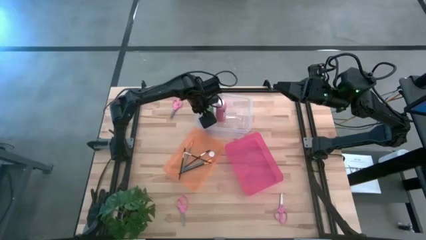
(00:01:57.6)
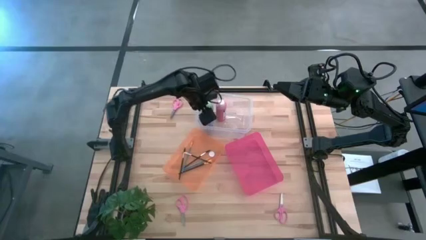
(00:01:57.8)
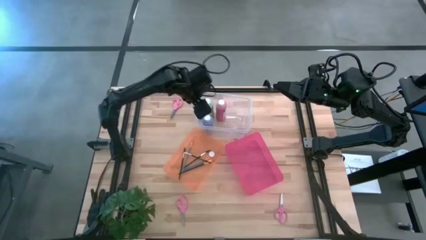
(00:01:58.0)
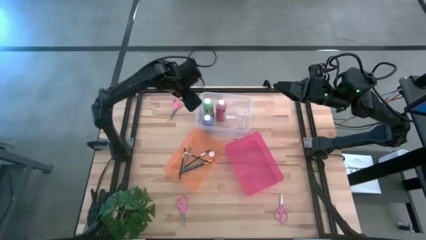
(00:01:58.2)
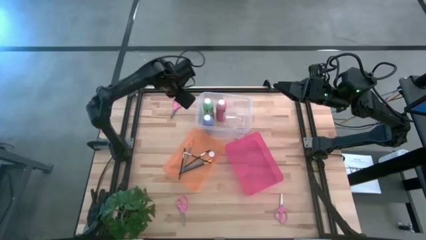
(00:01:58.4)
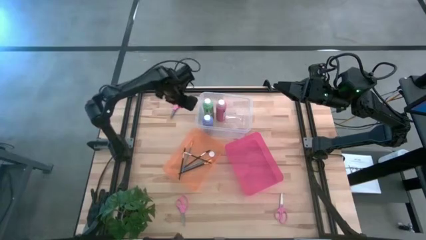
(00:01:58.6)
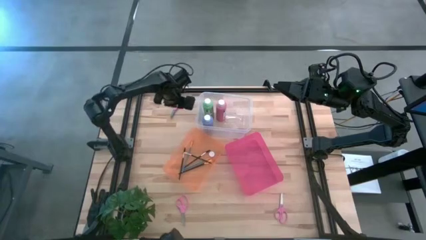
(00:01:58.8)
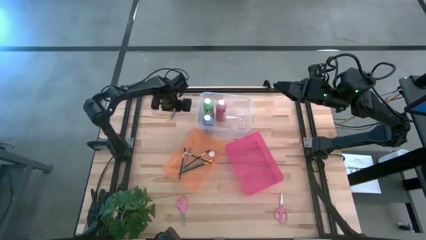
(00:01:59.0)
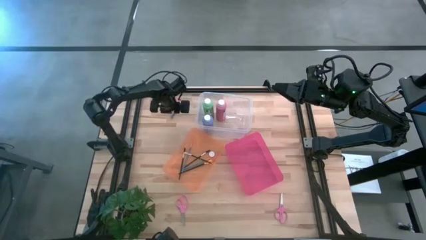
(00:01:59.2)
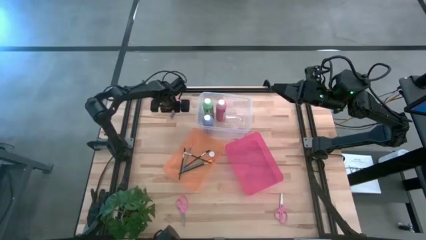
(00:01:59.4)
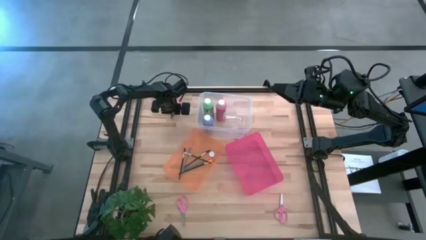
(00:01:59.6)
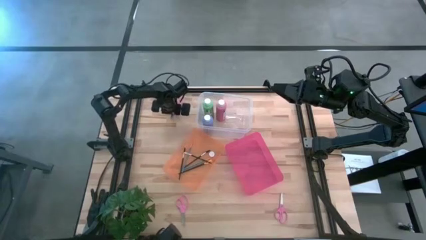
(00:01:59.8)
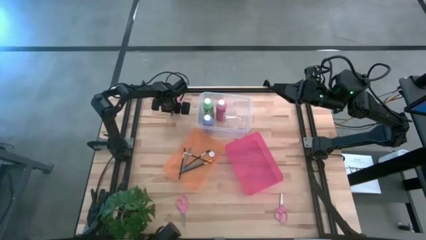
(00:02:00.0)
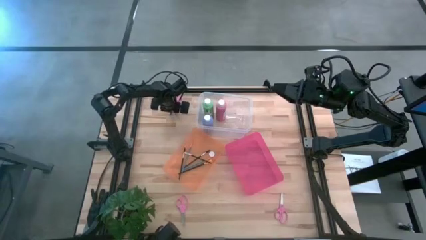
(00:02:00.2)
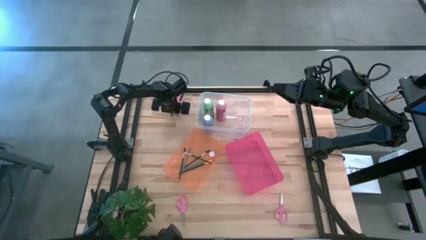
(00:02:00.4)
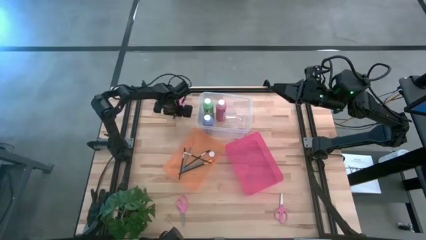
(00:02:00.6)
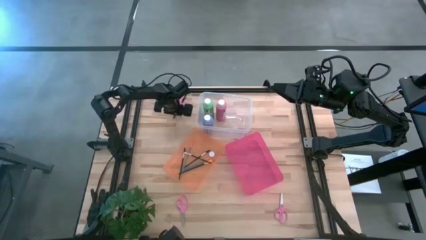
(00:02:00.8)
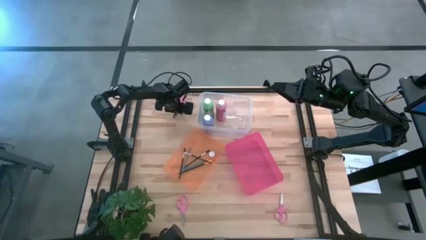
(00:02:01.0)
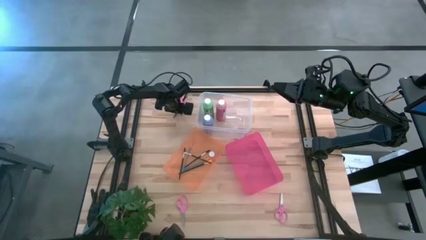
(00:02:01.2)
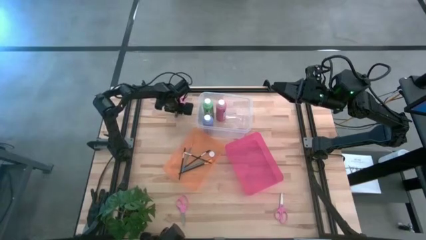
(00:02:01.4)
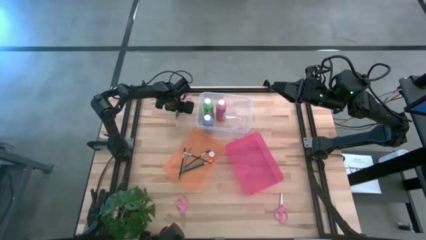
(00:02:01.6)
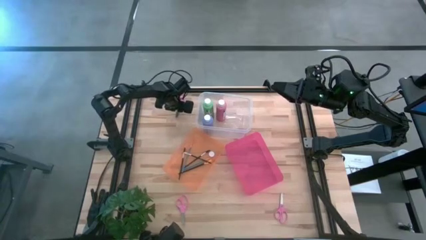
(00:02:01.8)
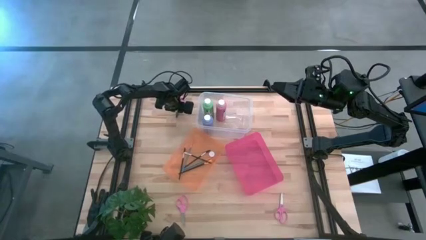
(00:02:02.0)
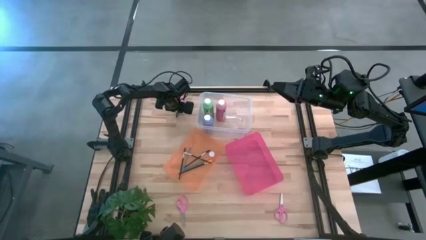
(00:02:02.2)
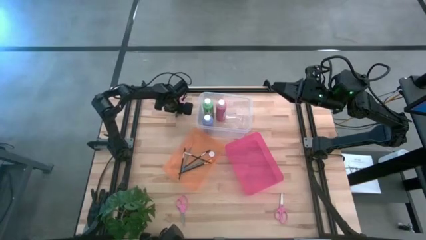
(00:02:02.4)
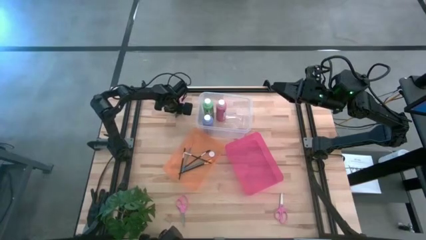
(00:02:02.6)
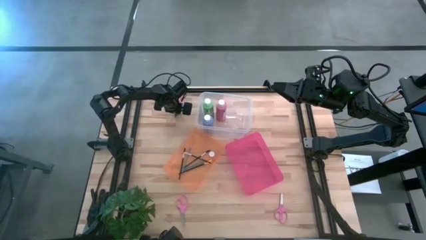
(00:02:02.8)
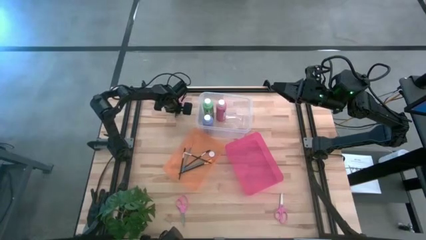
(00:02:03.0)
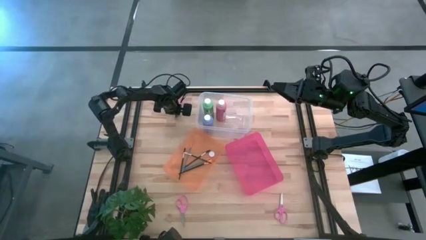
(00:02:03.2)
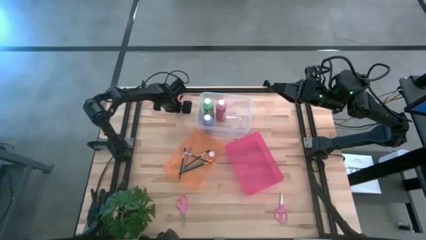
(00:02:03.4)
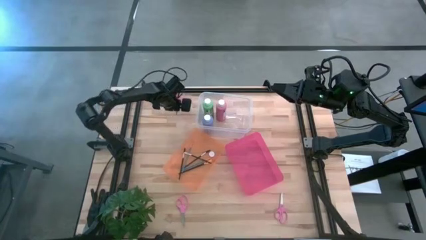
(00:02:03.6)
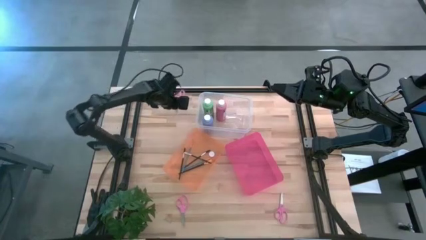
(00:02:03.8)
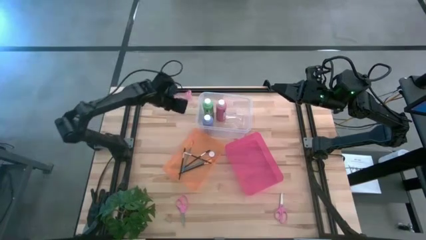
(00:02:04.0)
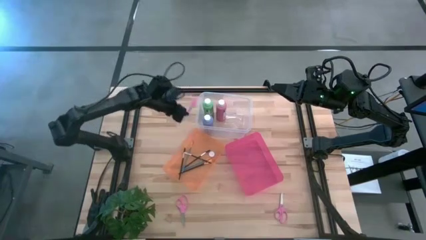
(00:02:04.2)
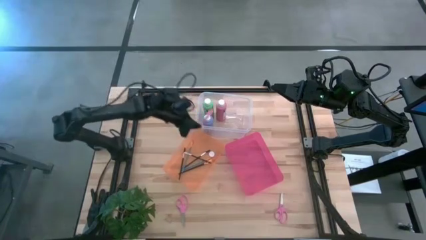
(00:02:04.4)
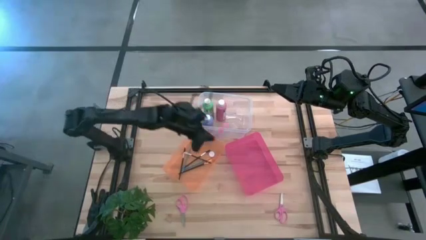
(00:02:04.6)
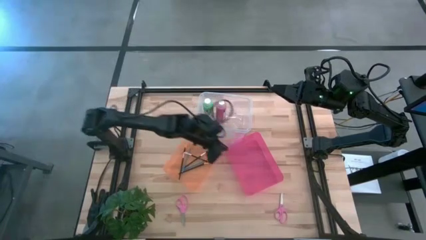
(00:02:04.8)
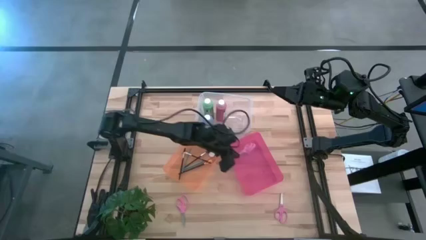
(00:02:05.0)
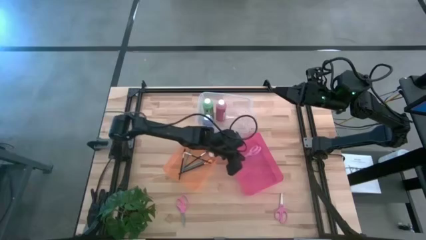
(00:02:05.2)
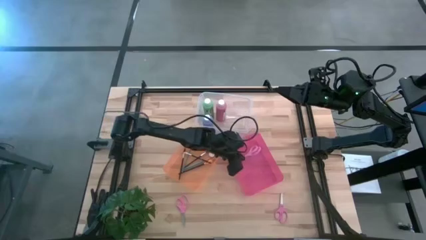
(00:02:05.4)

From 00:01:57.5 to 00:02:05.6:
Task: Pick & Place Paint Supplies
Put the top left pink scissors into the pink bin

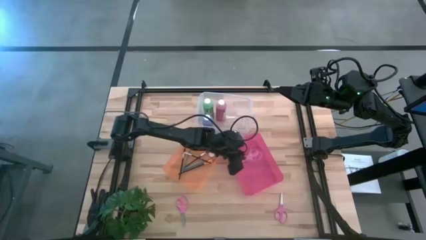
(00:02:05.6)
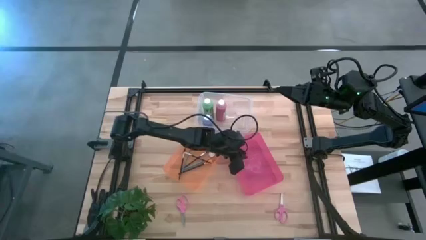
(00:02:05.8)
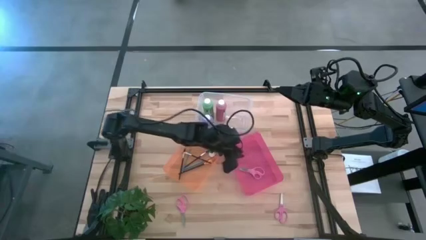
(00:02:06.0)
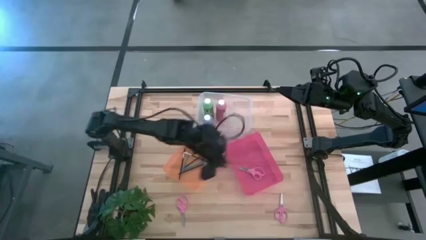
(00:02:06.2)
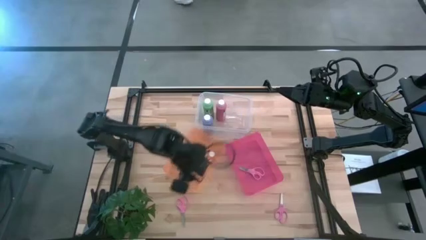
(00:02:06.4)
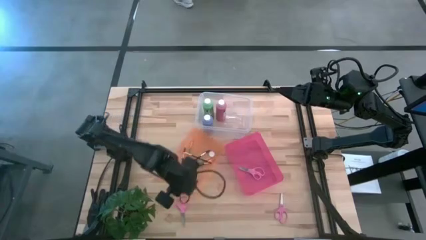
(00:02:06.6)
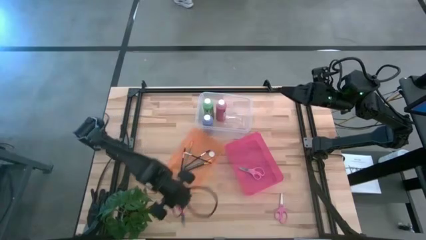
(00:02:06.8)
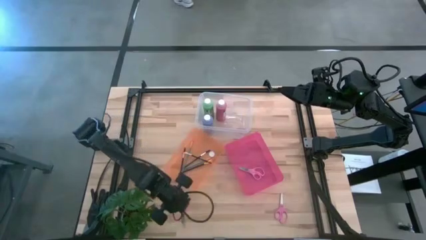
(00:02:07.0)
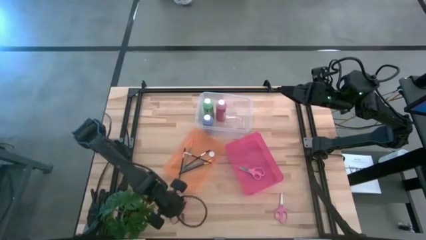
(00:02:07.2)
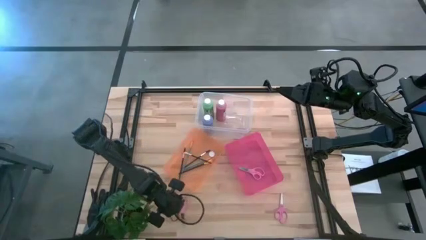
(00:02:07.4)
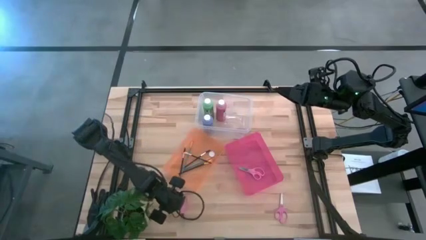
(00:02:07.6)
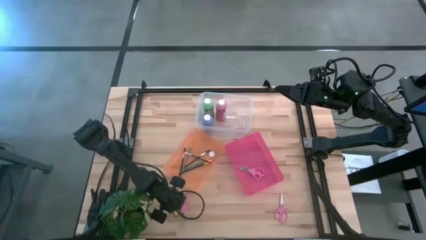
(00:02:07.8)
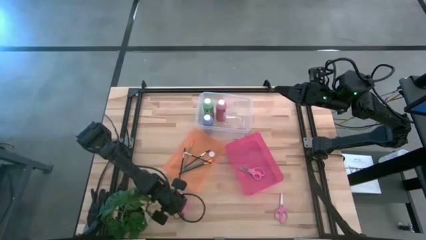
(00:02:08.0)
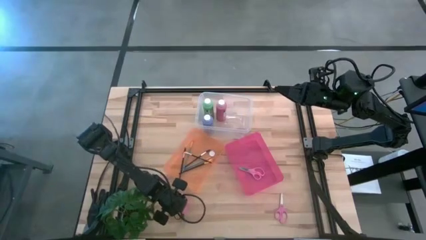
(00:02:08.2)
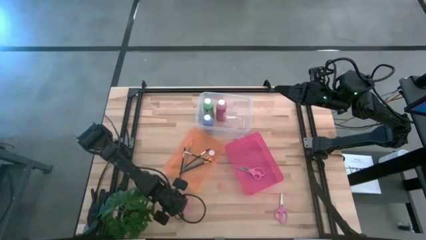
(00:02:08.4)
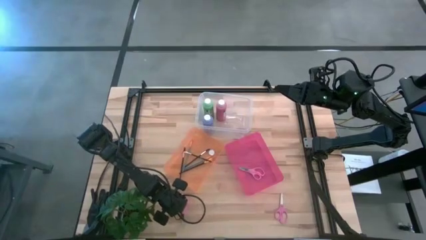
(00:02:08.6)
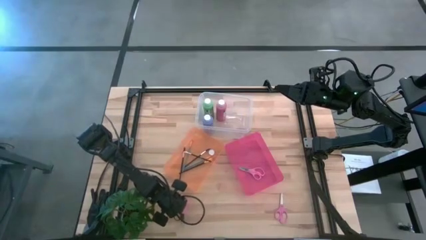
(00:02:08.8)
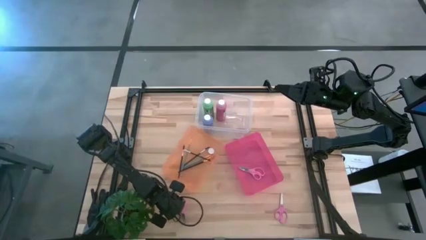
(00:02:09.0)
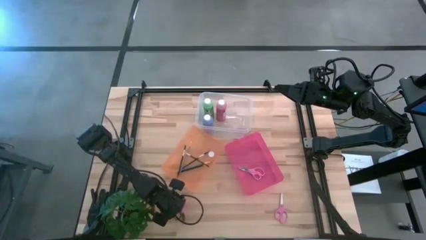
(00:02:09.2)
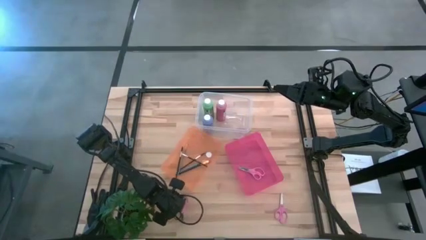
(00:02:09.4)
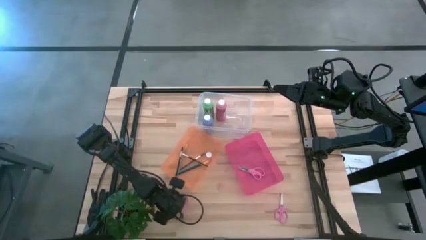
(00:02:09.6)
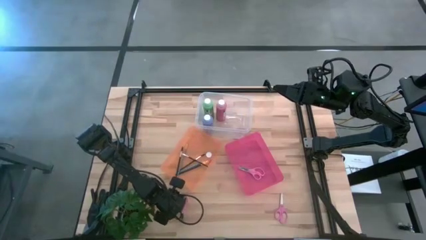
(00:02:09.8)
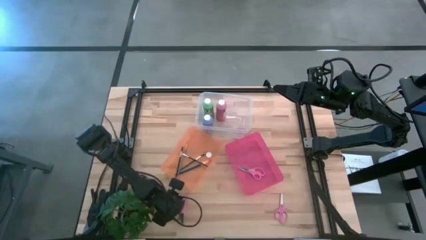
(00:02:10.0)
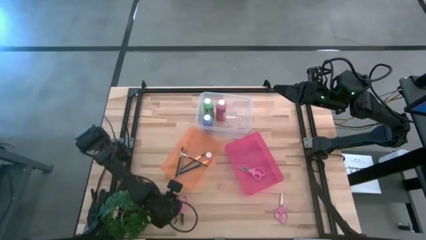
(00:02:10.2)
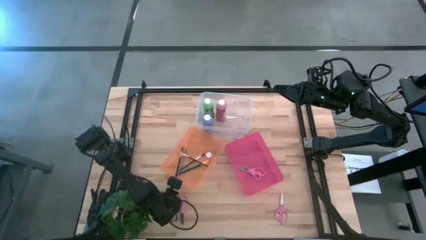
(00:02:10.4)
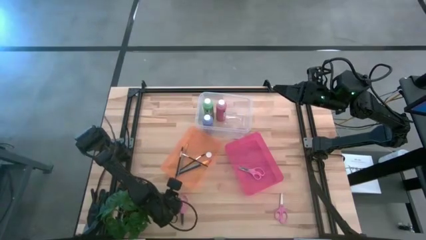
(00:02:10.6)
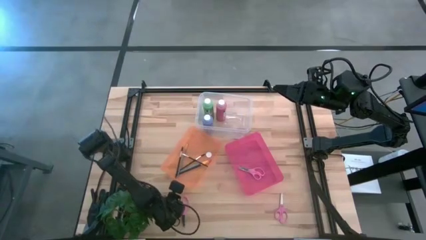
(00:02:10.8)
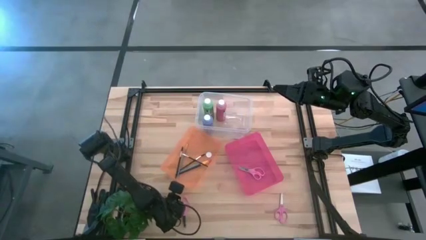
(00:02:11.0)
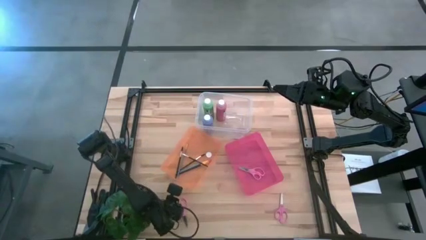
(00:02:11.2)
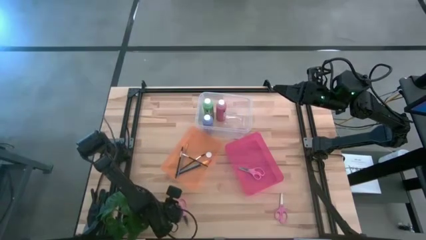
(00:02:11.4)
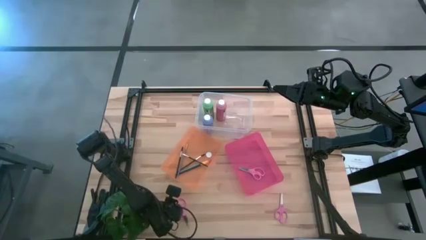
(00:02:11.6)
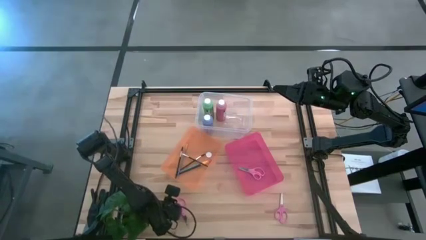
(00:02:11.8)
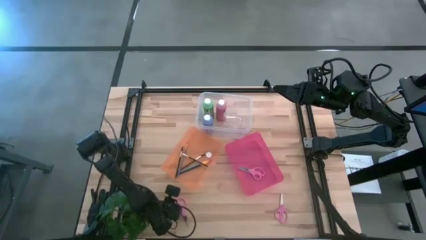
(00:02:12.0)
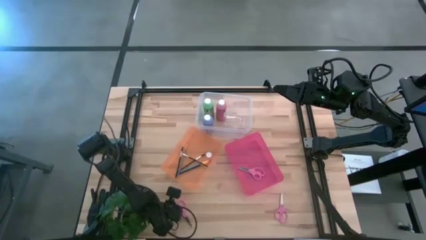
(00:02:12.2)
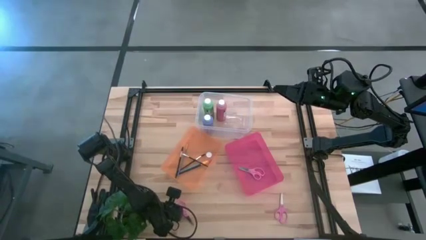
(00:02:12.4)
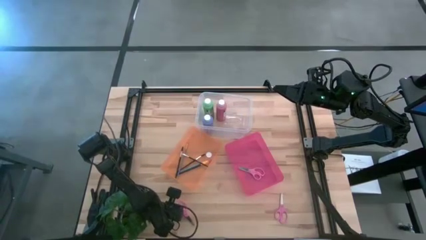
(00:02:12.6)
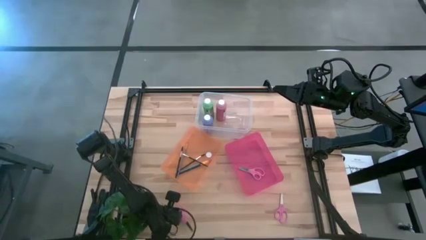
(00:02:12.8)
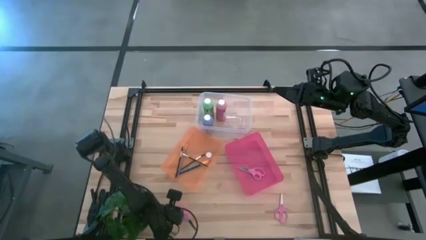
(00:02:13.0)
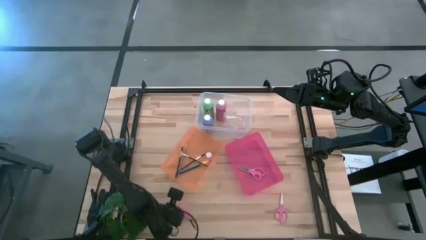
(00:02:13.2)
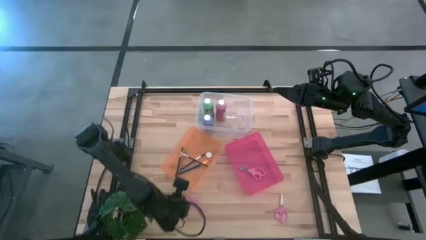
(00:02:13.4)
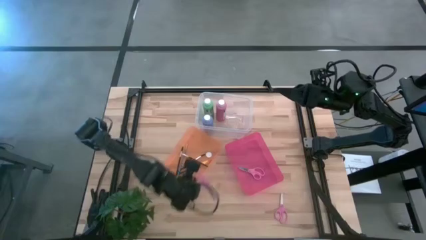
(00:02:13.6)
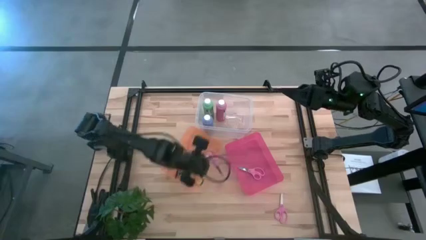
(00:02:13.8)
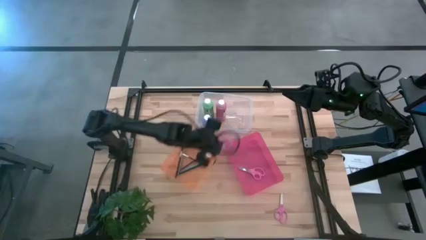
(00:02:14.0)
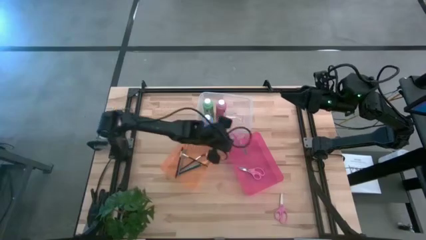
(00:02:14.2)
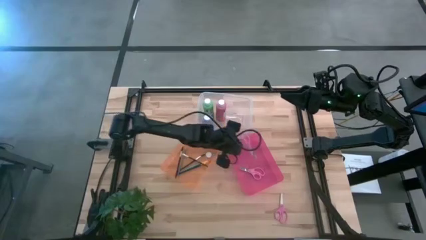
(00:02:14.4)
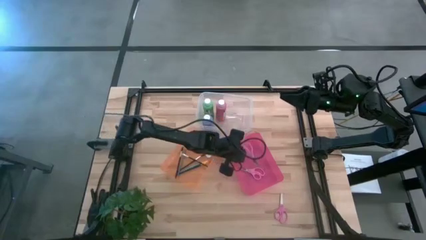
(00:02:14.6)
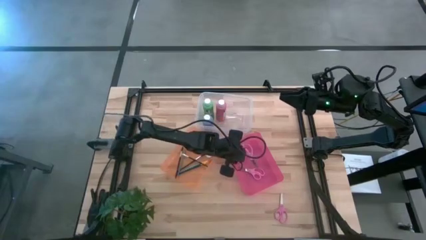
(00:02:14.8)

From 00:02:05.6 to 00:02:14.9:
Put the left pink scissors into the pink bin
